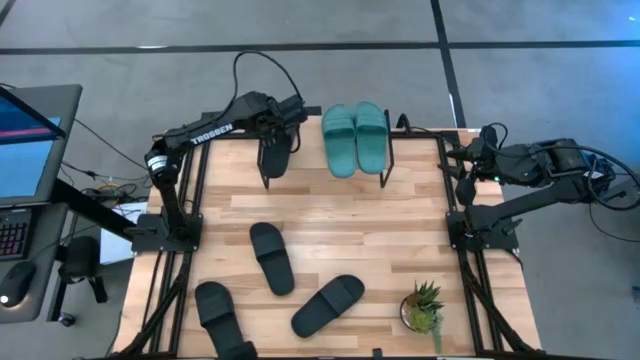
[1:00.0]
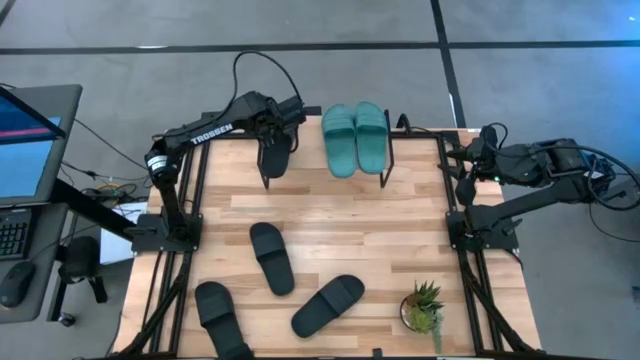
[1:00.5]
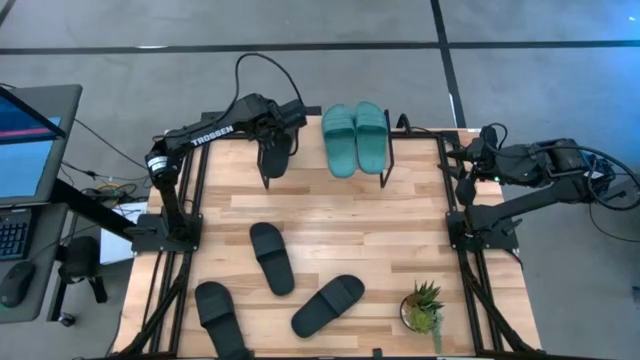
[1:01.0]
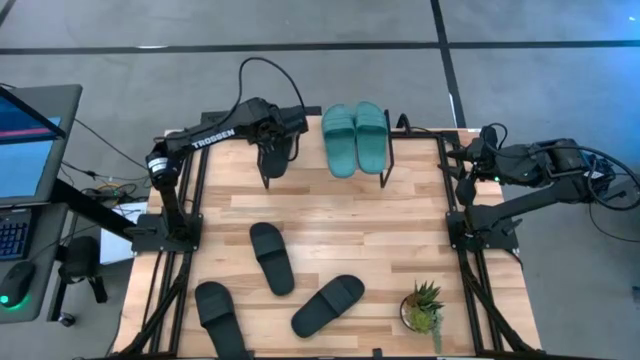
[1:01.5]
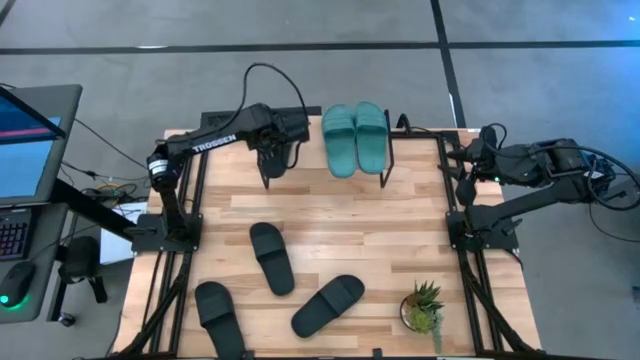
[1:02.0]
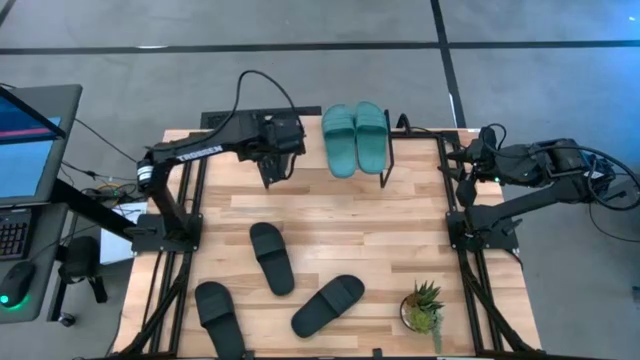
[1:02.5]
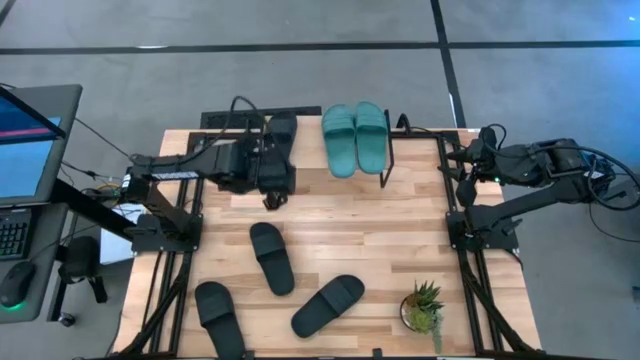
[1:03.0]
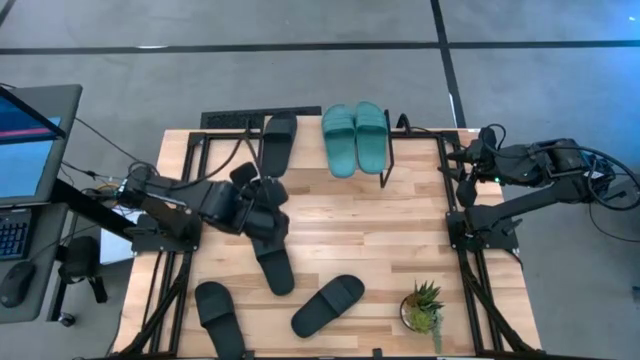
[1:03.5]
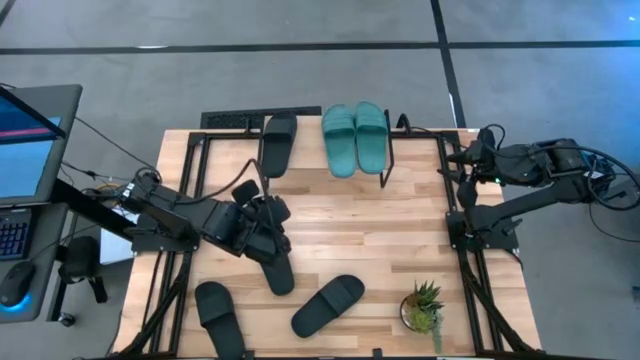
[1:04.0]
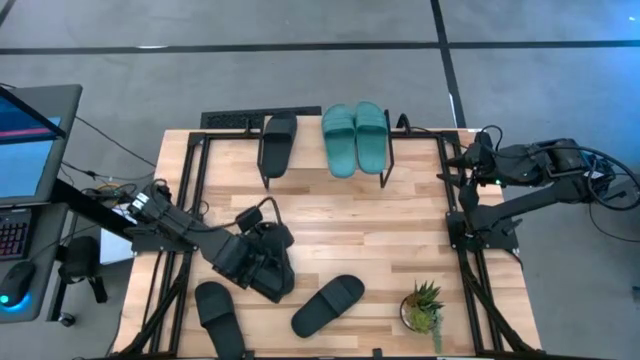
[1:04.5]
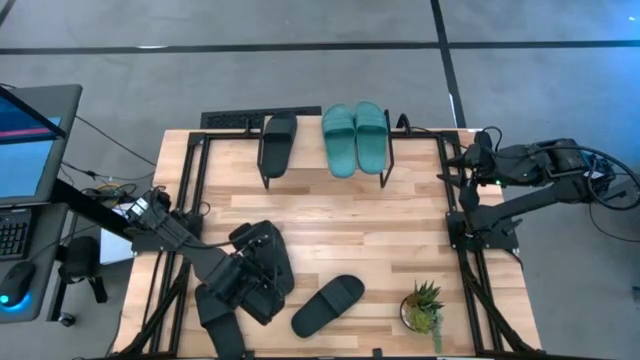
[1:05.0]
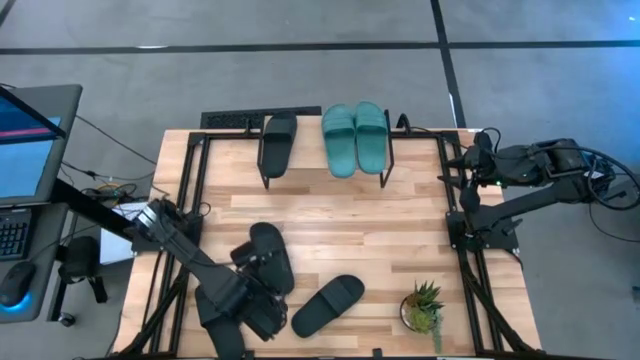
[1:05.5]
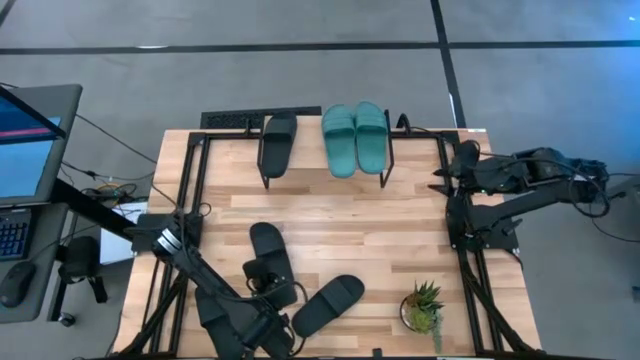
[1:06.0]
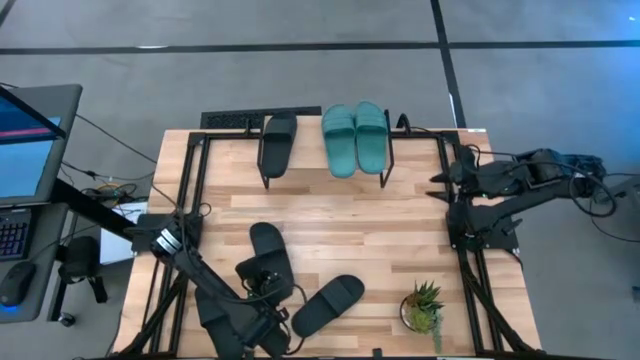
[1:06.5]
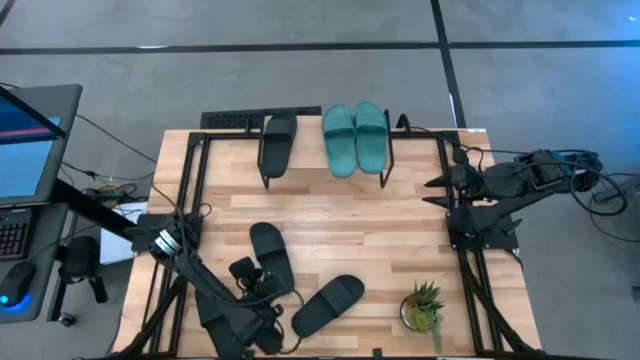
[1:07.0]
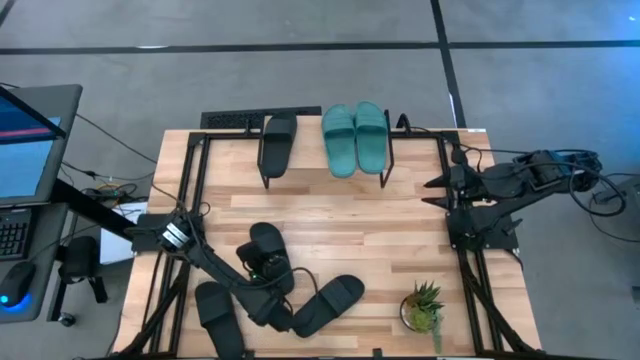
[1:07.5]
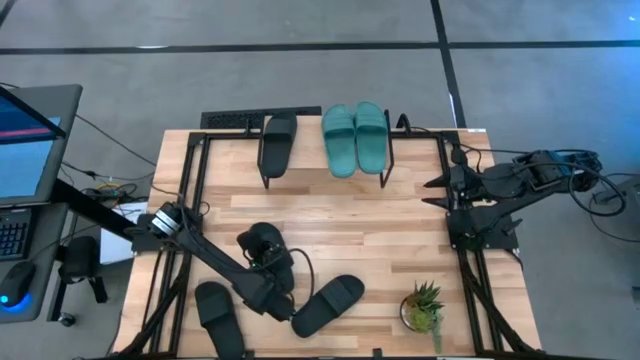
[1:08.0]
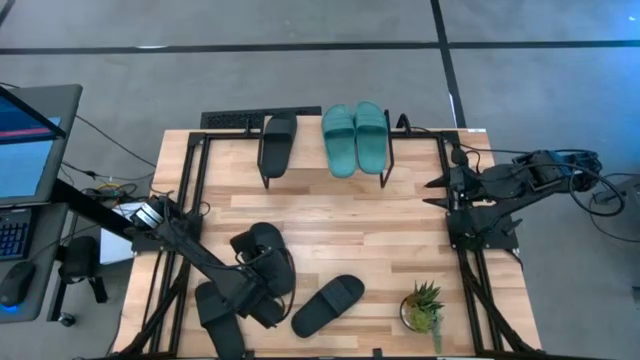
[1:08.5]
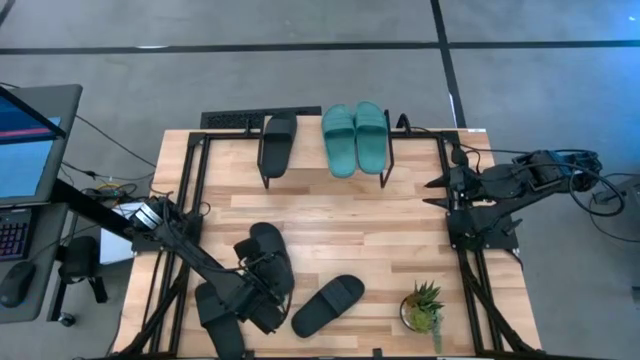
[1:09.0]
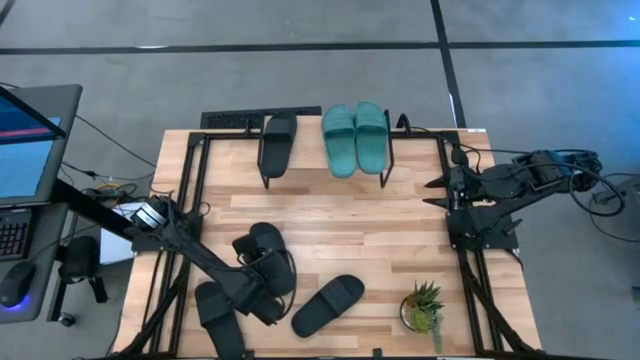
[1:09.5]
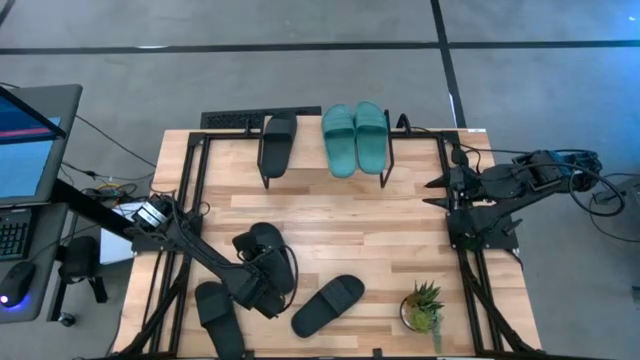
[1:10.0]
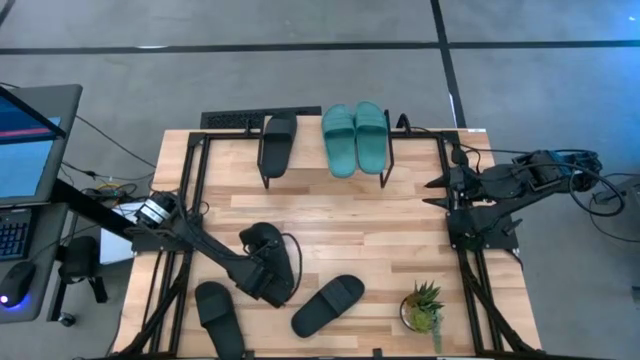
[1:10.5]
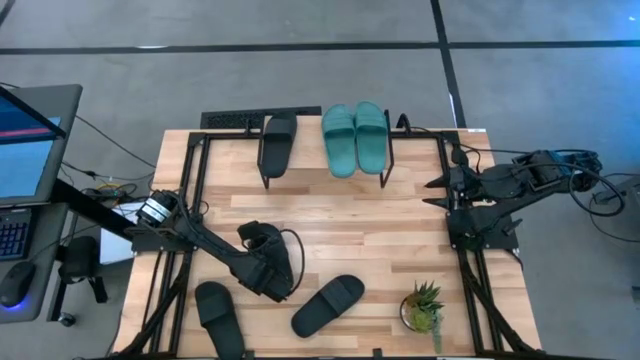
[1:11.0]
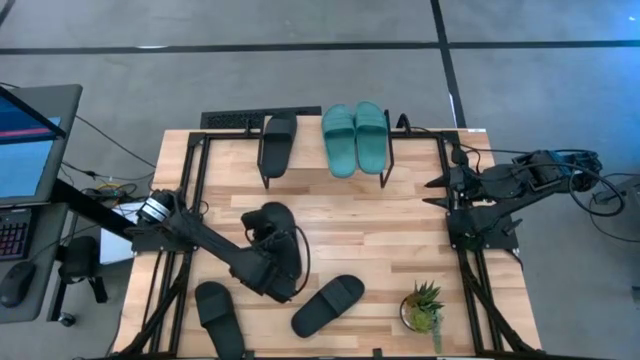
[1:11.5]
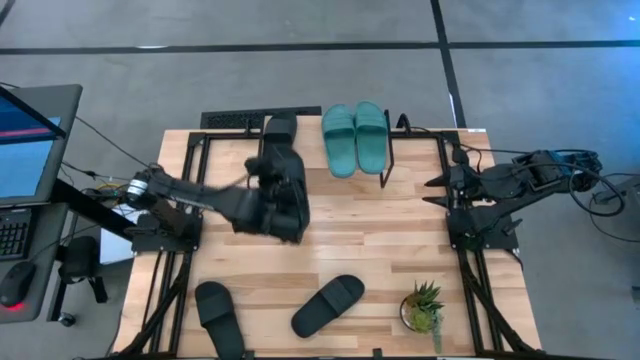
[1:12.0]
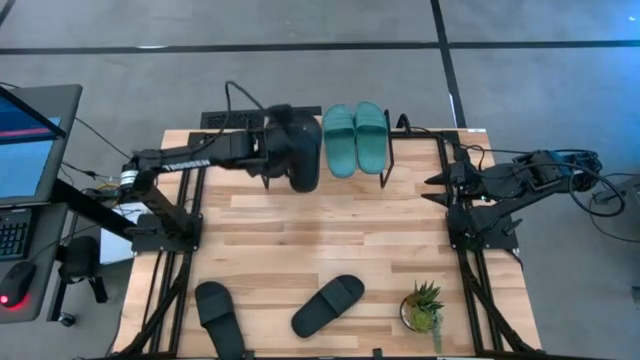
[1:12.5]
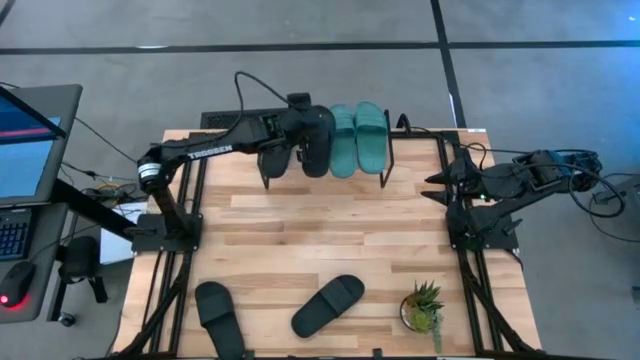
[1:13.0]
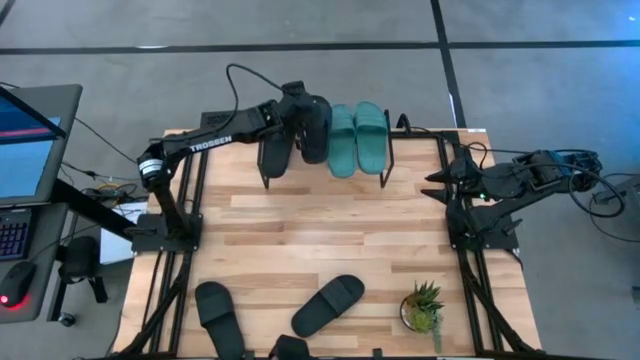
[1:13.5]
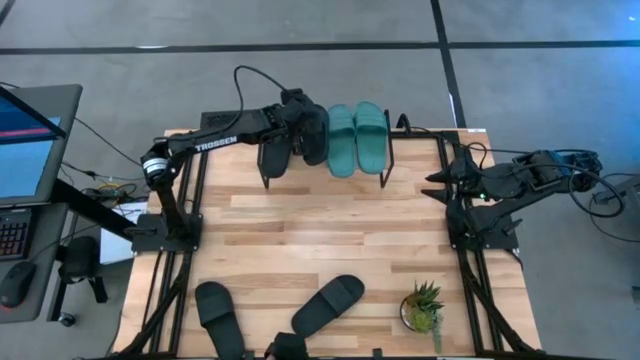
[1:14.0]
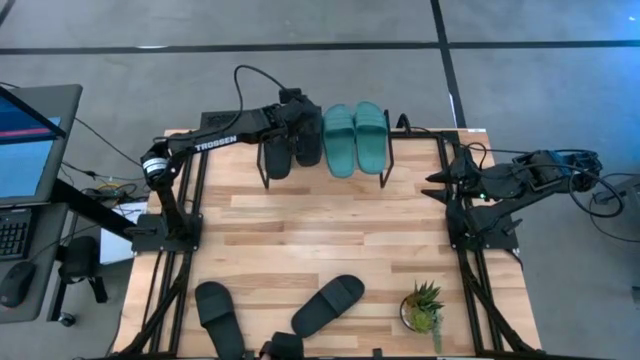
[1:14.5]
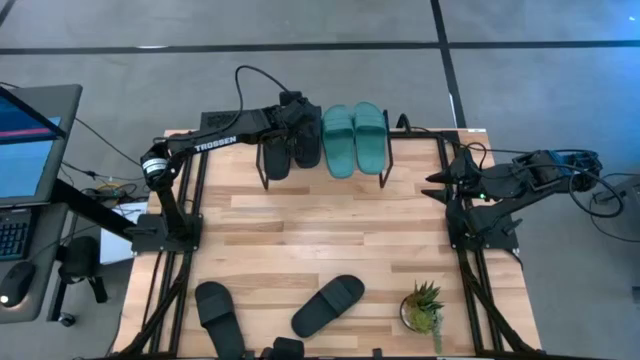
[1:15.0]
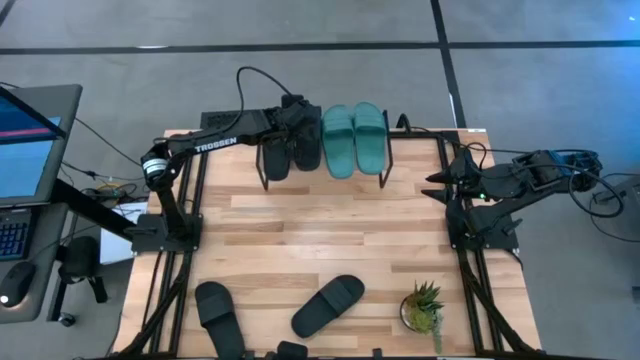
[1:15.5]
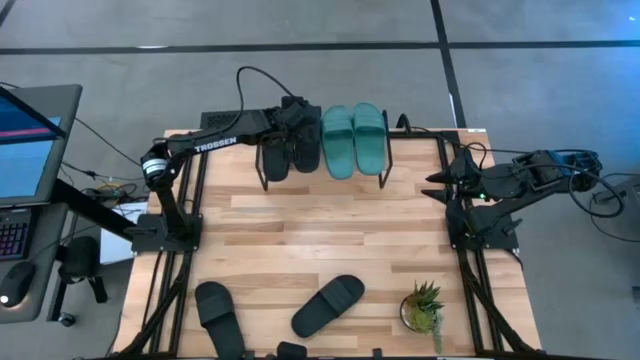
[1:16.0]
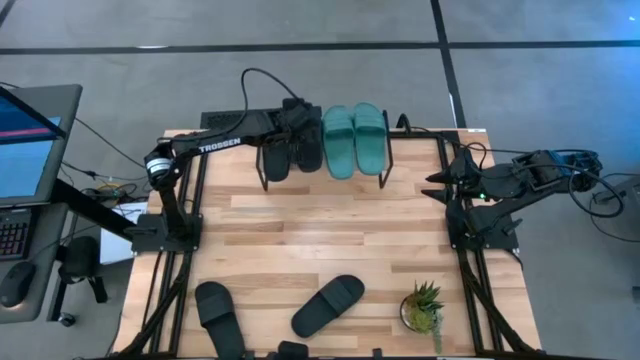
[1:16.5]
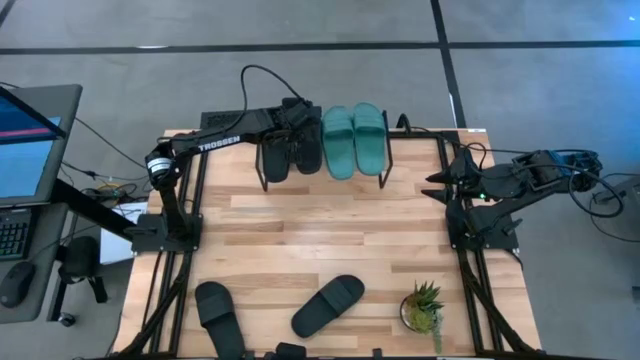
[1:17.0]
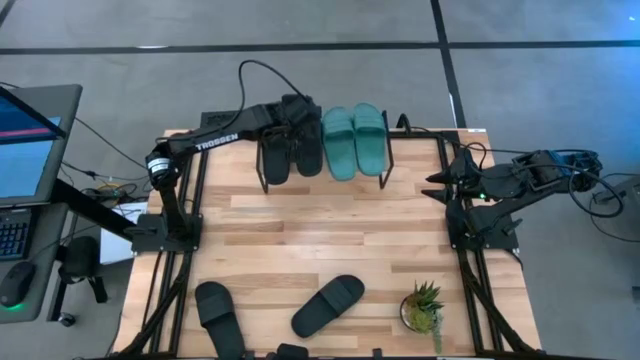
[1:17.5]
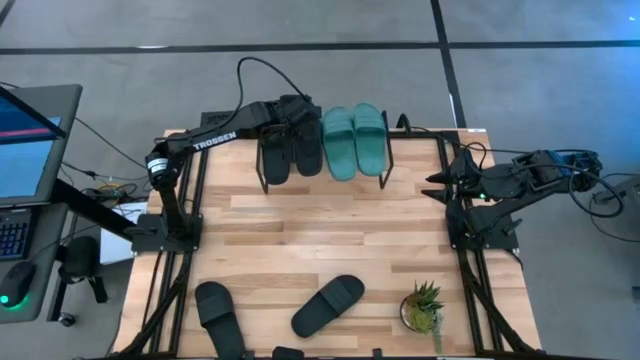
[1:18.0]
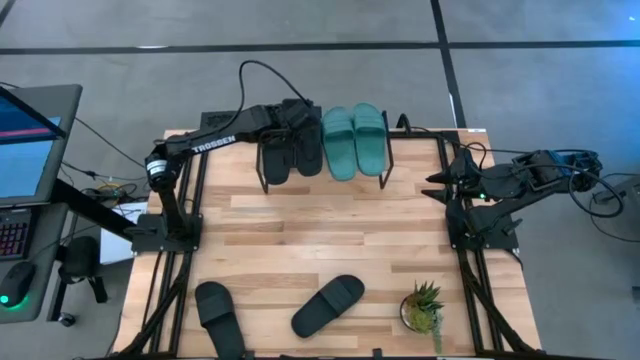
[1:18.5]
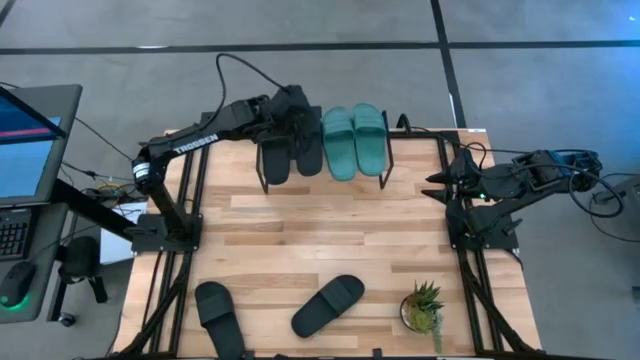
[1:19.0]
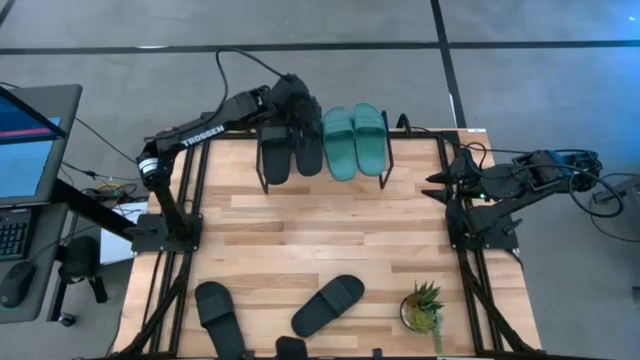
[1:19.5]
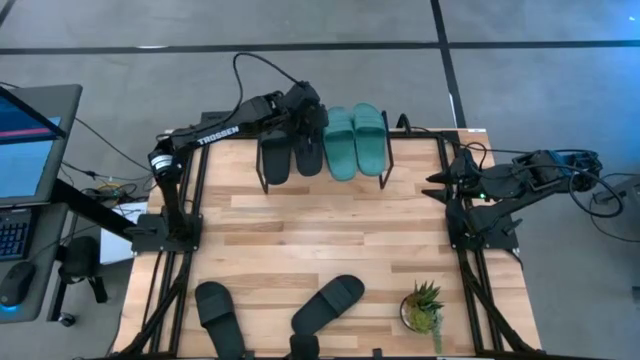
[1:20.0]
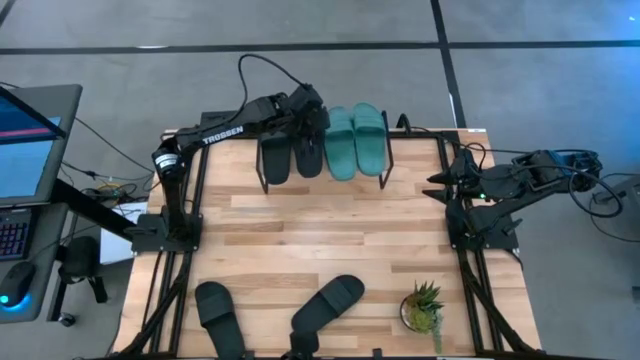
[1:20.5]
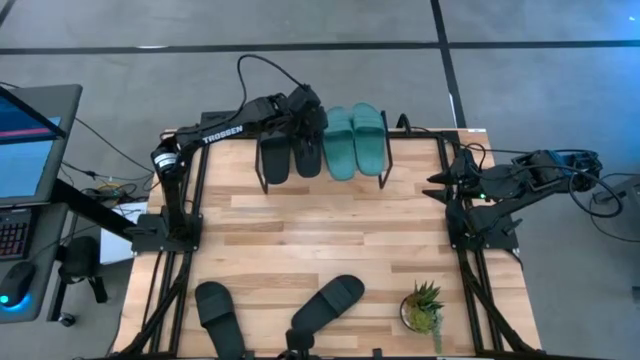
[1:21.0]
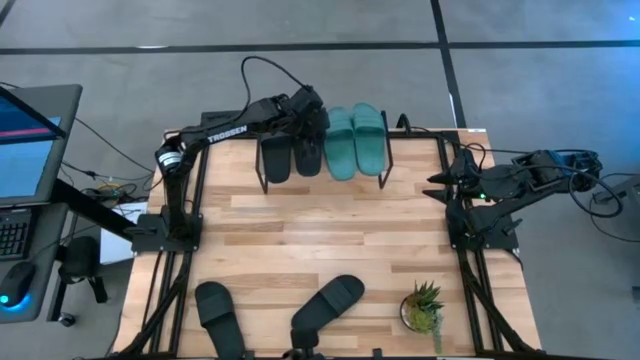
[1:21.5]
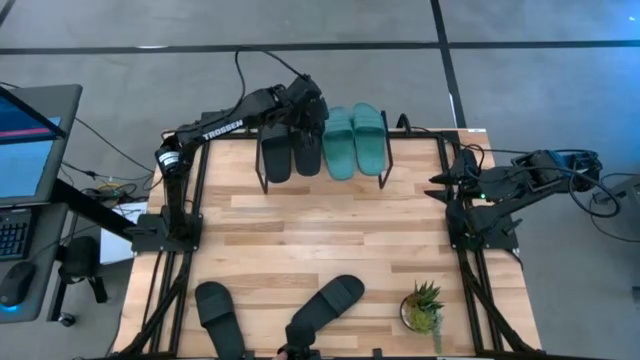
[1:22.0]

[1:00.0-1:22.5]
Task: Pick and place slides into the shelf
Put the black slipper on the shelf
